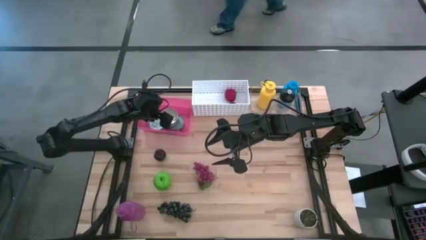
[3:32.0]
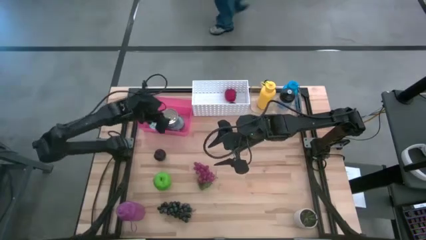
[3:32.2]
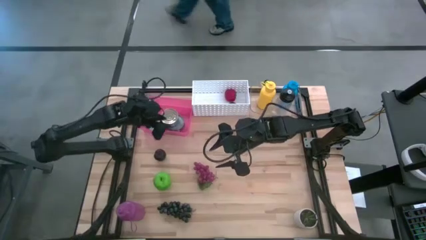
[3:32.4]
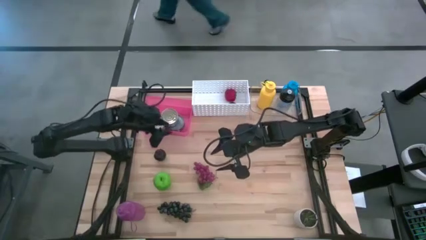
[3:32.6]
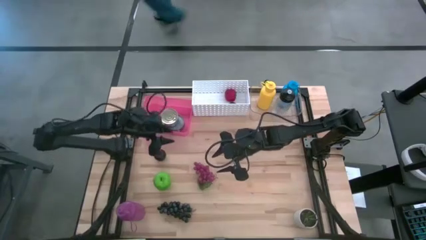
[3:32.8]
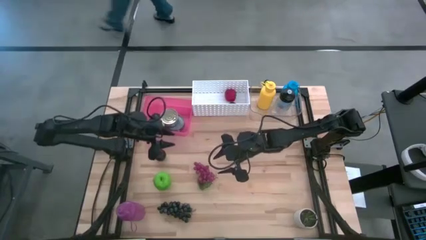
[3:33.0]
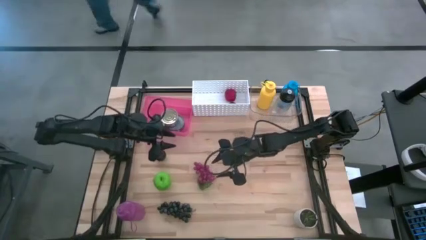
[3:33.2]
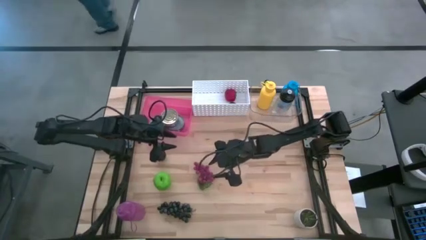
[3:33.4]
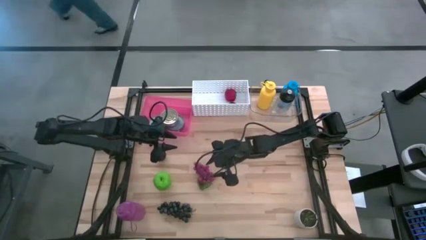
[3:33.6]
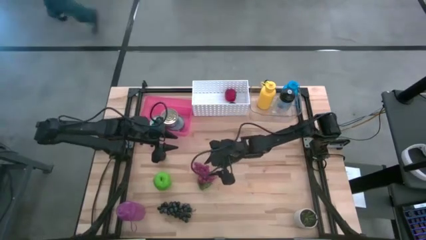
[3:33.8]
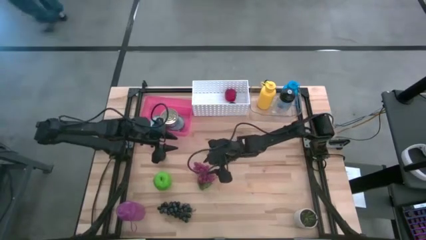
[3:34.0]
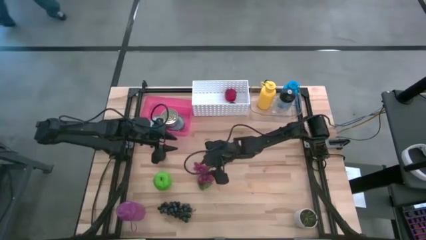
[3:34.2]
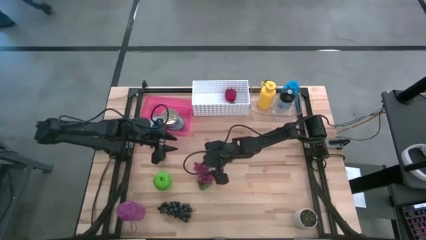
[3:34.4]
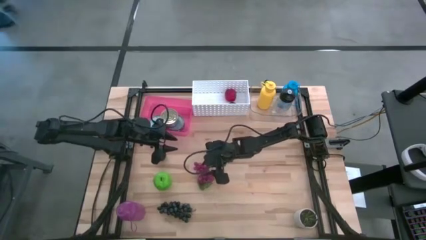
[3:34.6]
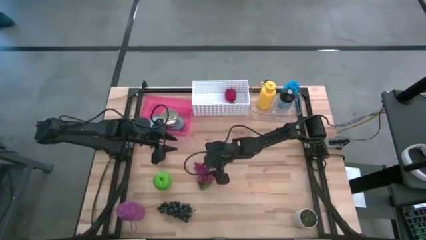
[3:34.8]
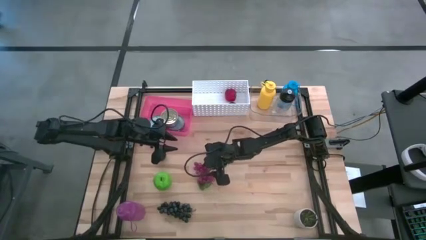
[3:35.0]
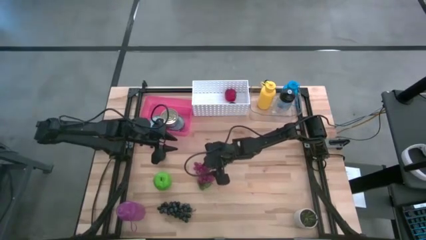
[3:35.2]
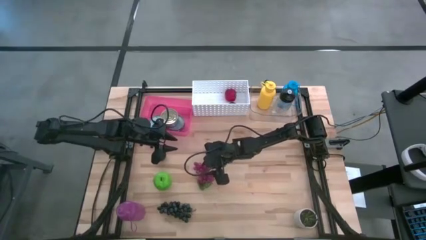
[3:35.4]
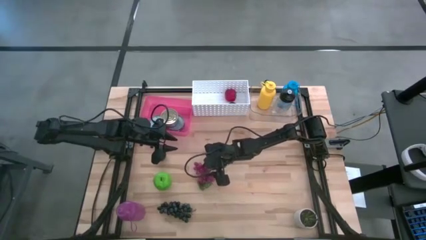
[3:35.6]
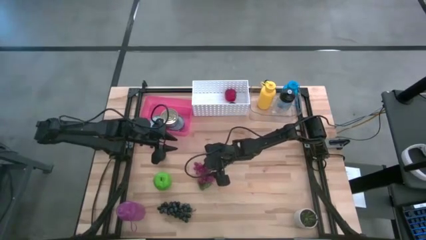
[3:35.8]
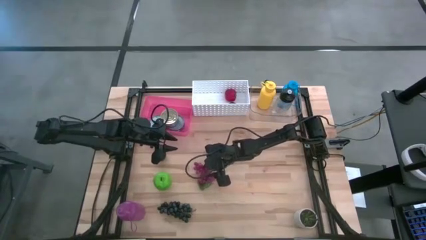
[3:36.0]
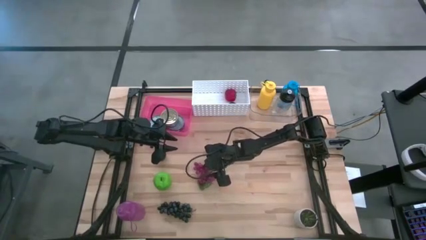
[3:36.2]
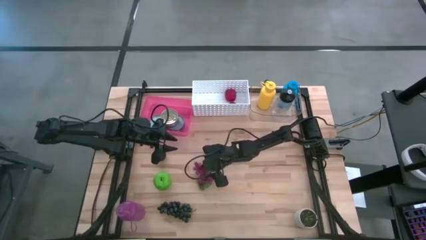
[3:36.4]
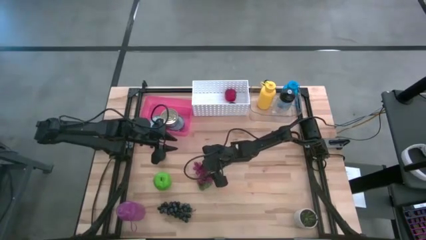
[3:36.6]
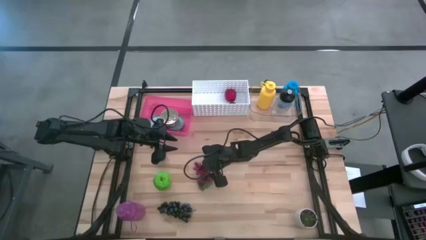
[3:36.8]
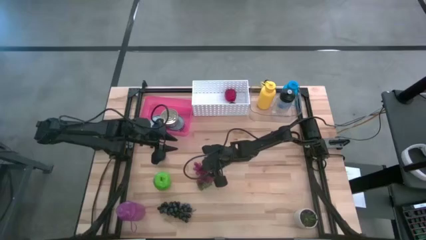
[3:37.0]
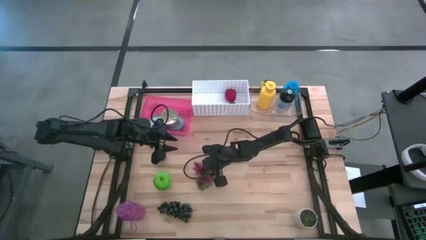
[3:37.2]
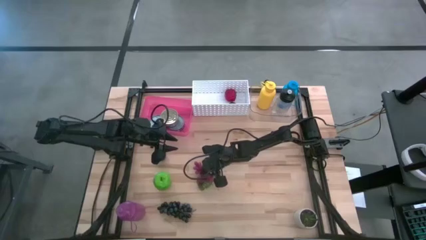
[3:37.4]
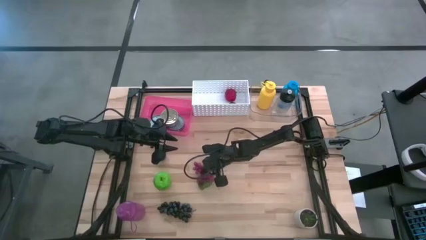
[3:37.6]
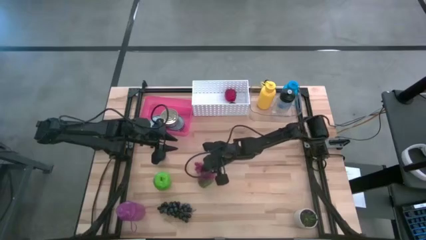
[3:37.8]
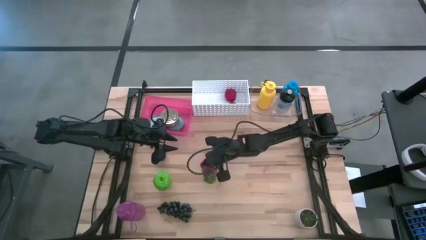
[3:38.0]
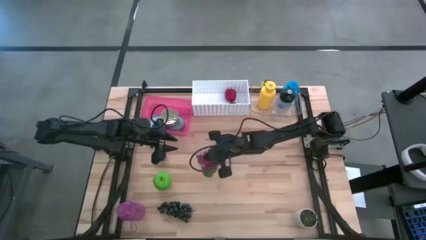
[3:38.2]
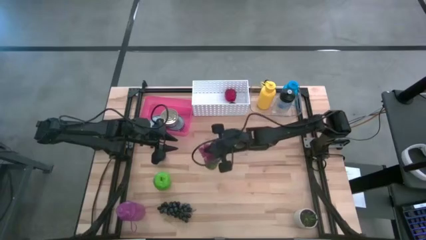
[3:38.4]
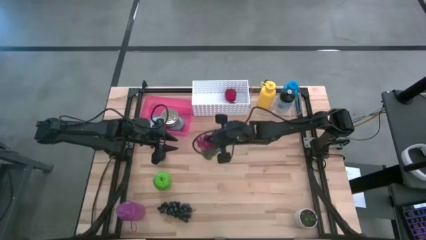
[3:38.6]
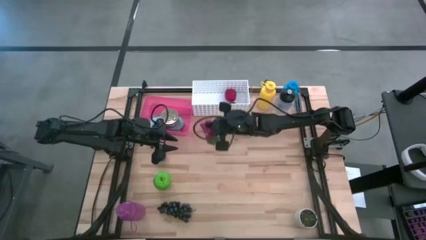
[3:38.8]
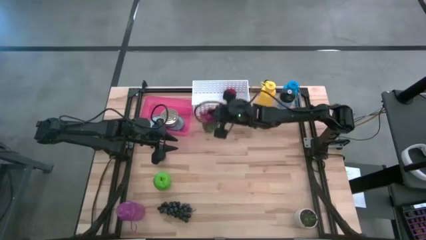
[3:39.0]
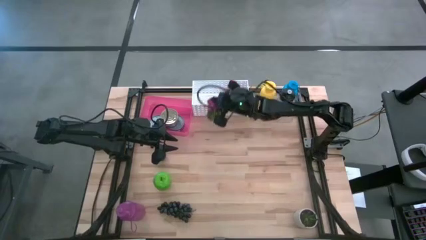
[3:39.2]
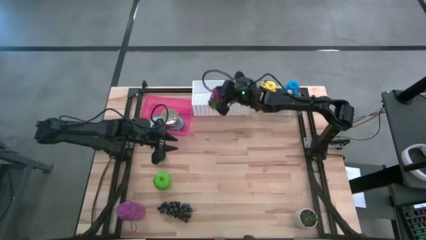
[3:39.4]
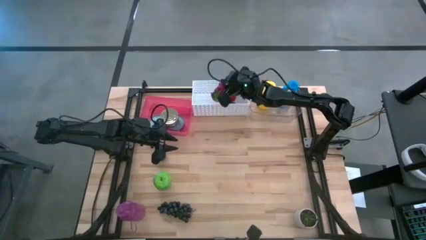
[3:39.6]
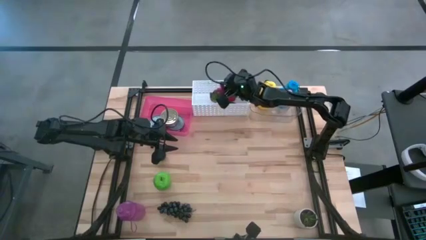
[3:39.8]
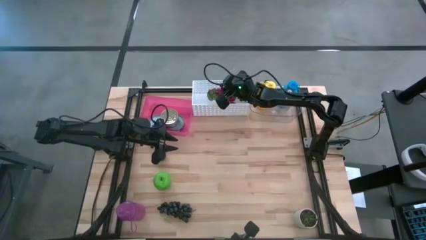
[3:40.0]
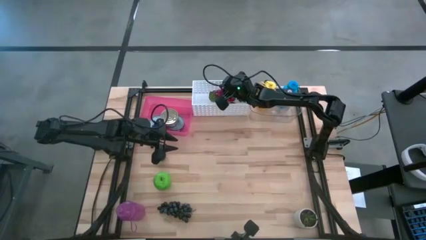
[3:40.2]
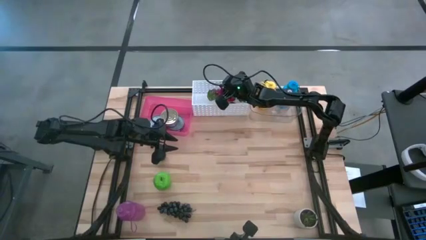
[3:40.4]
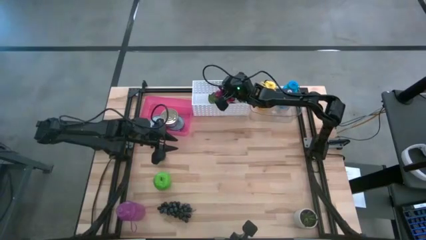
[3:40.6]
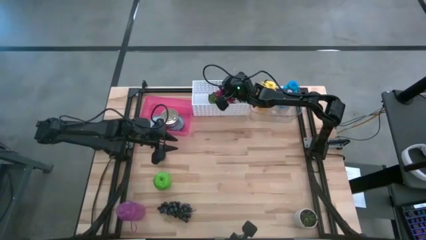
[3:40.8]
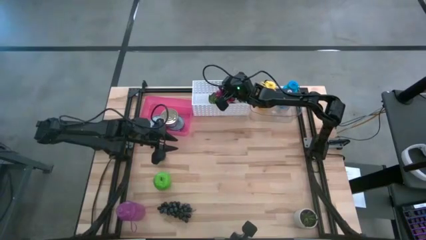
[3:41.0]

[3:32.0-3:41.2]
Task: Pick & Place Food Item
Put the red grapes into the white bin

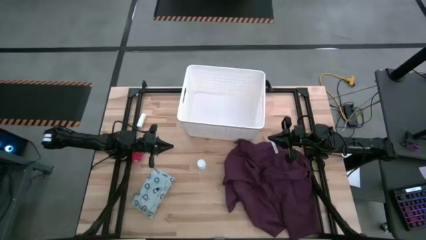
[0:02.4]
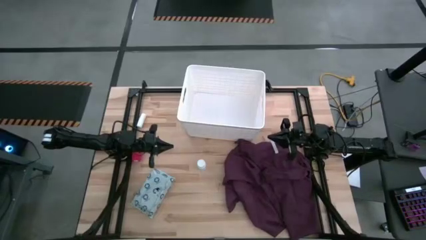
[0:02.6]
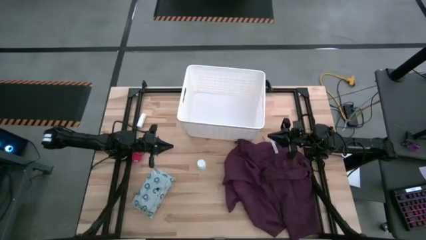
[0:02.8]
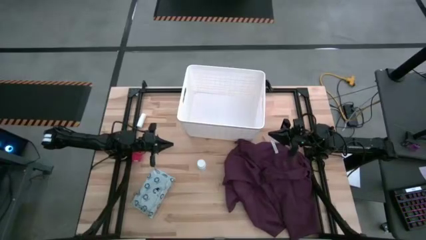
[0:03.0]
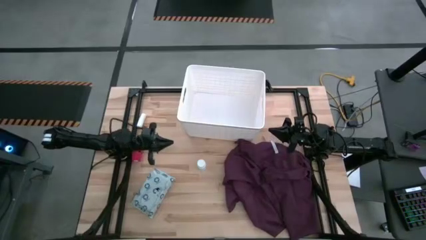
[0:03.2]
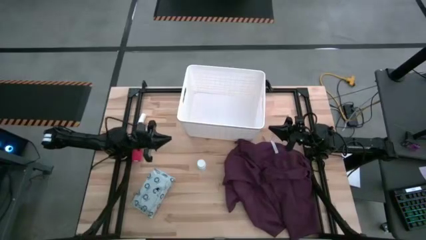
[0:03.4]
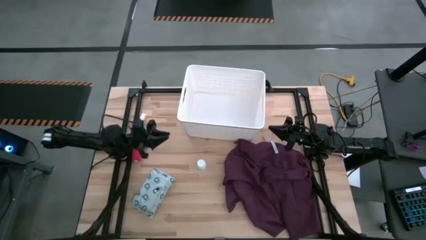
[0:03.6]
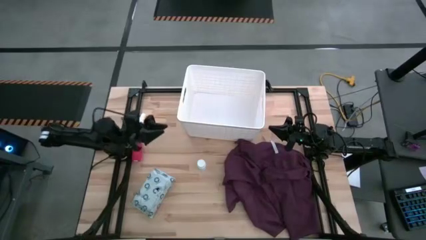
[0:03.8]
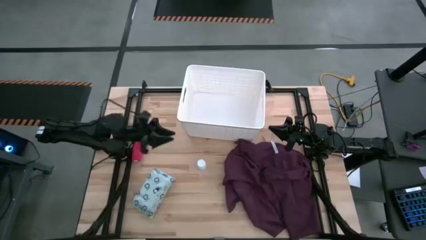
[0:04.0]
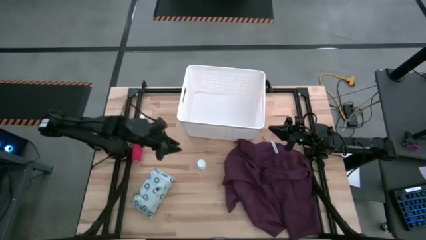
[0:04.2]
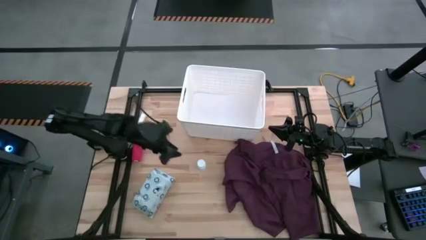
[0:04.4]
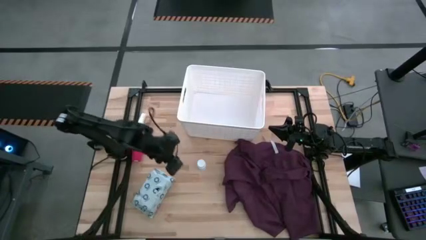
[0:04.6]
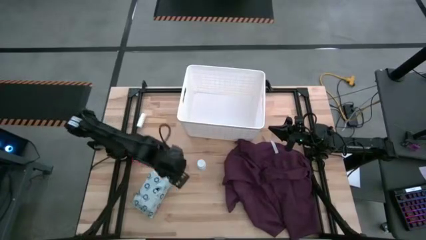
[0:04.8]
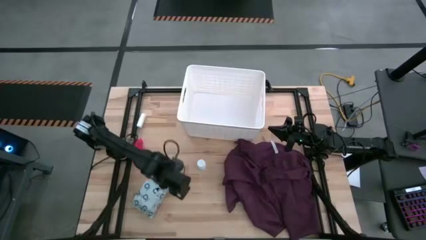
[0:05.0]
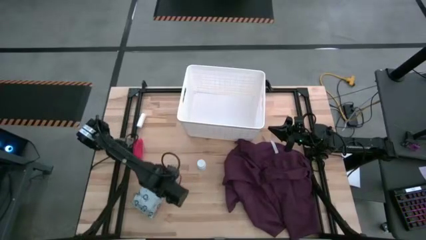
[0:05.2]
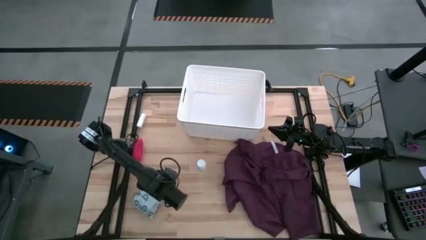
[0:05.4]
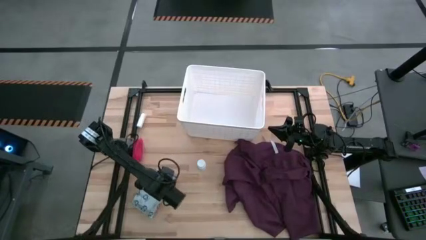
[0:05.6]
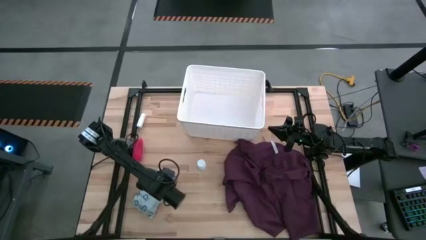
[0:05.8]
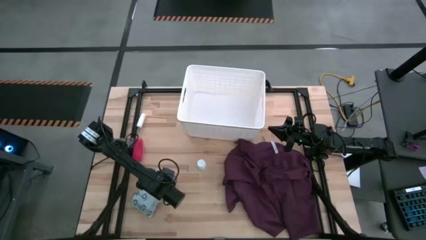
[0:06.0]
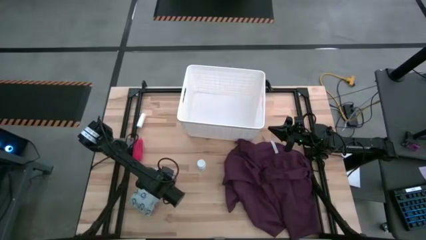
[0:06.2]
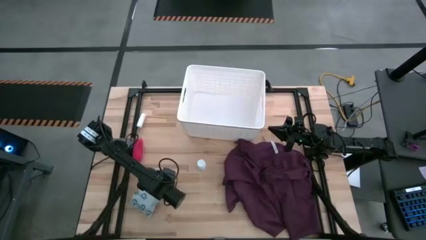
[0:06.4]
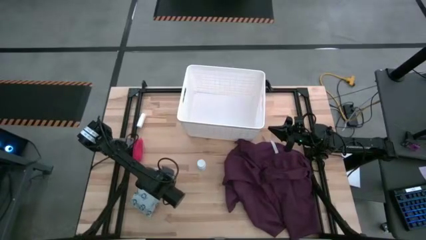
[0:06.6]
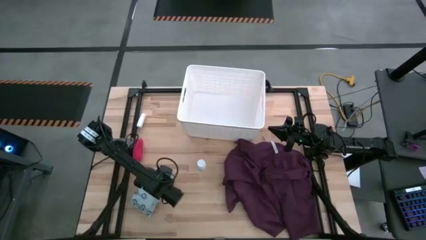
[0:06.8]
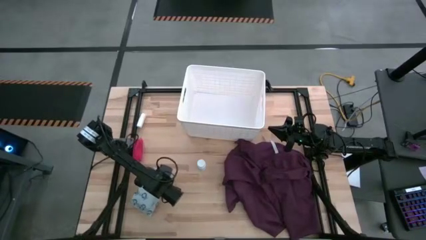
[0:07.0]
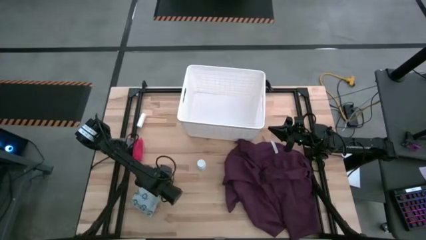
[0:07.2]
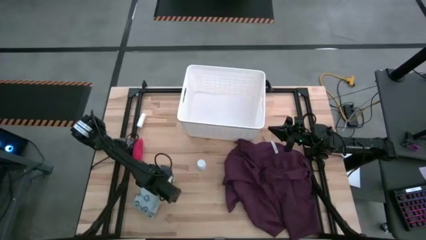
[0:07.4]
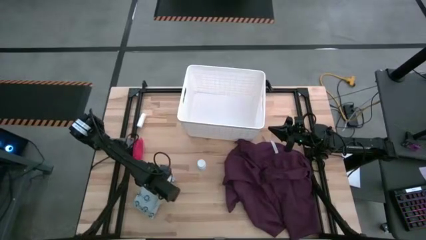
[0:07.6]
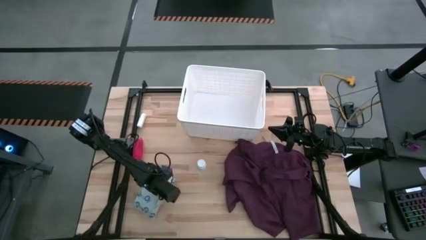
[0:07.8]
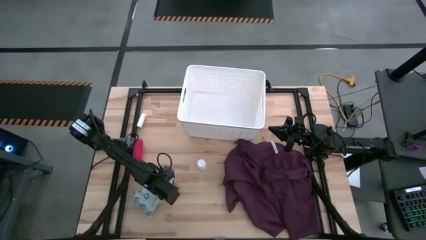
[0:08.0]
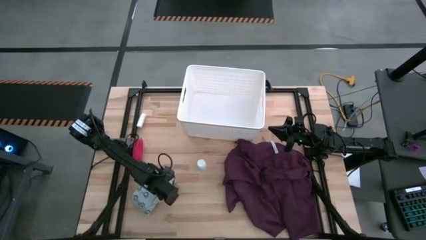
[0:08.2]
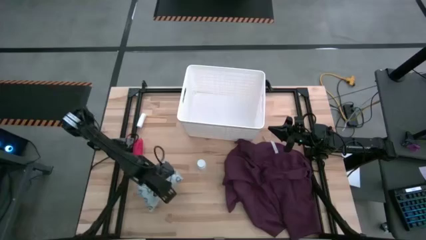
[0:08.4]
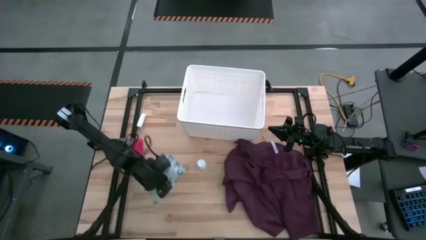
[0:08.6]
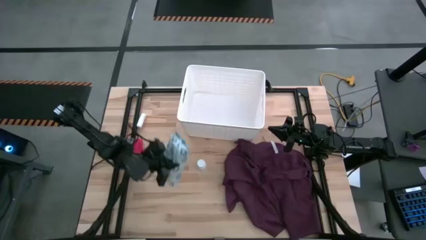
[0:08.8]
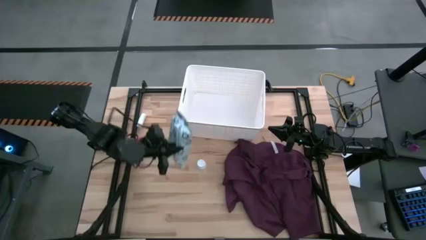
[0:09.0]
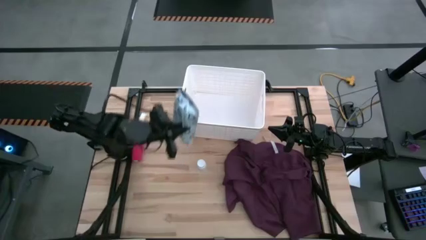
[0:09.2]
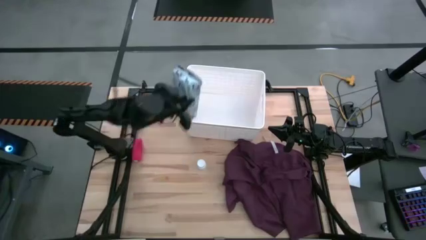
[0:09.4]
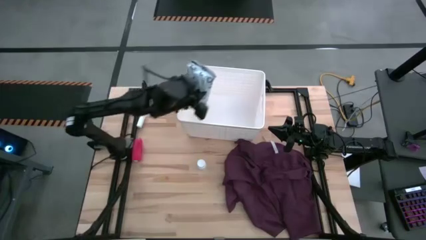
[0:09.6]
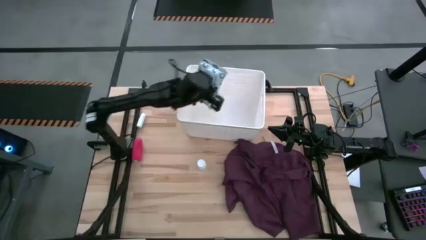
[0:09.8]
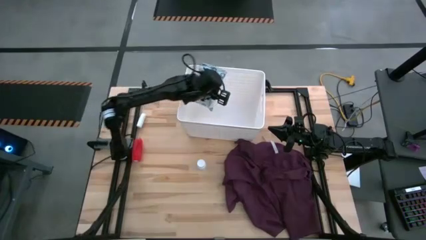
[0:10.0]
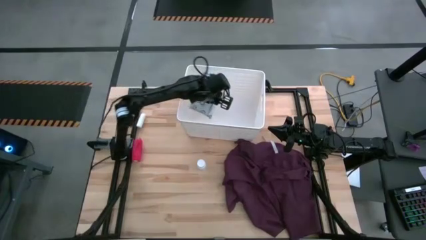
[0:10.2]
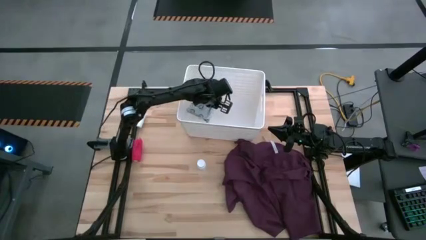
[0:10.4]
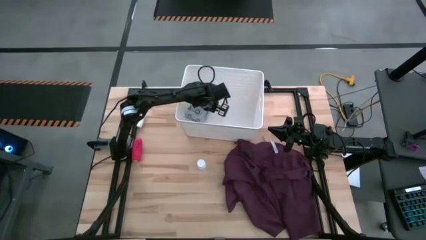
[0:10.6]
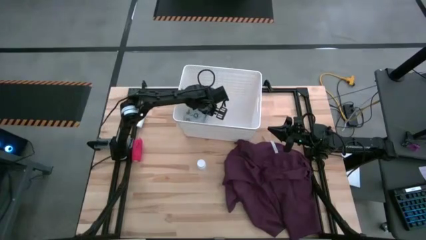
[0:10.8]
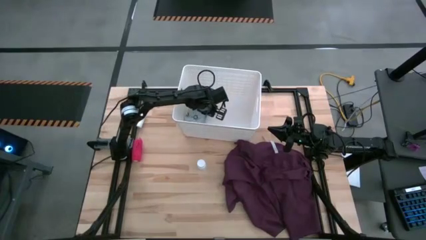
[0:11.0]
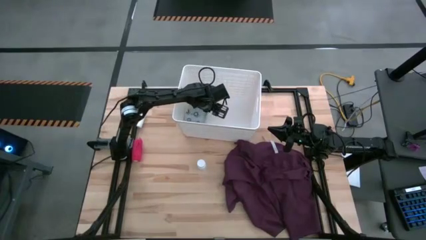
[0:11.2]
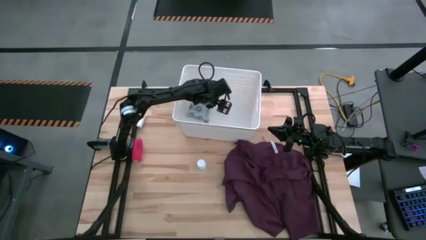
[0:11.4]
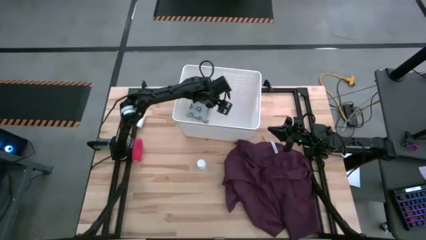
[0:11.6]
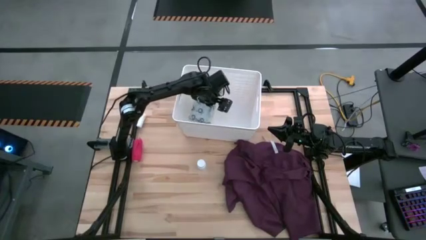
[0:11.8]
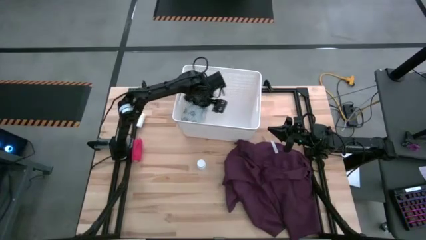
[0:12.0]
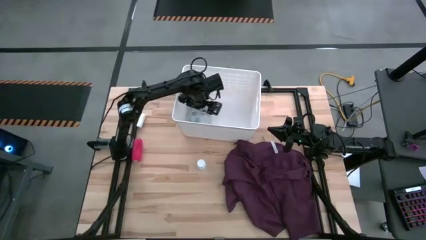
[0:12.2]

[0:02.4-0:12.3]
Task: Pick & place medical supplies in basket/bin
Put the mailer bag into the white bin
